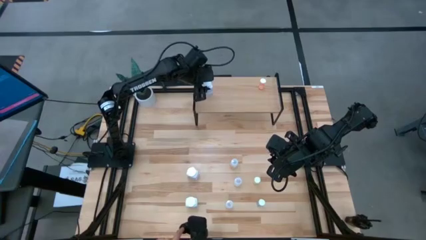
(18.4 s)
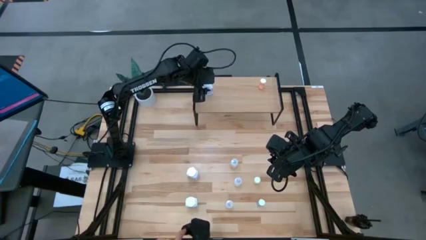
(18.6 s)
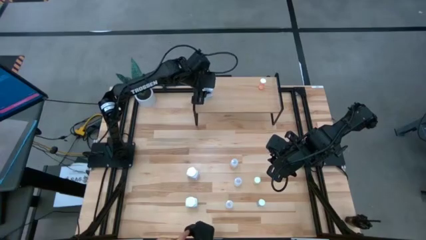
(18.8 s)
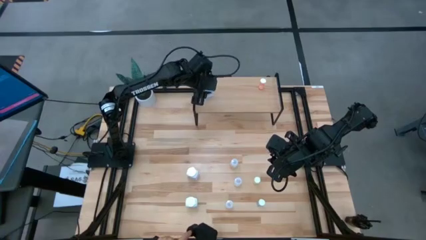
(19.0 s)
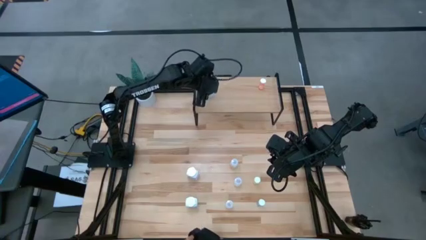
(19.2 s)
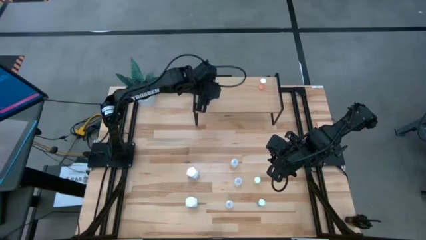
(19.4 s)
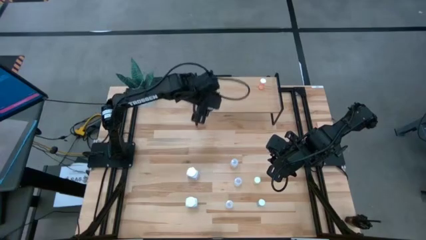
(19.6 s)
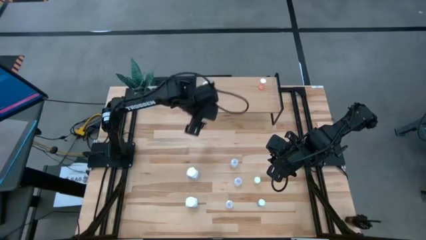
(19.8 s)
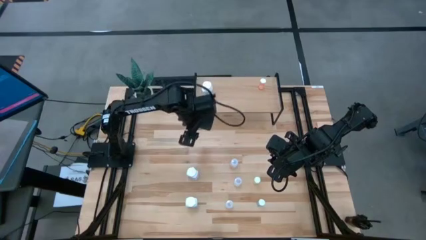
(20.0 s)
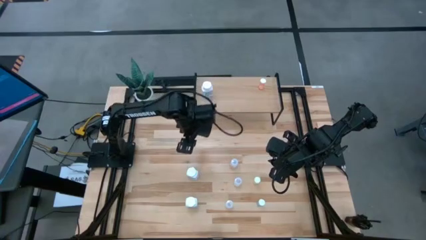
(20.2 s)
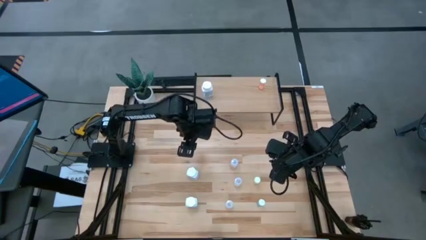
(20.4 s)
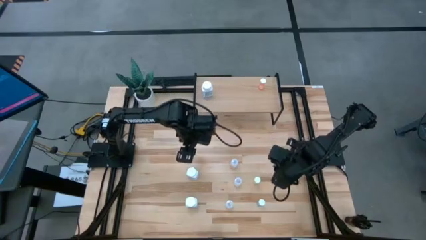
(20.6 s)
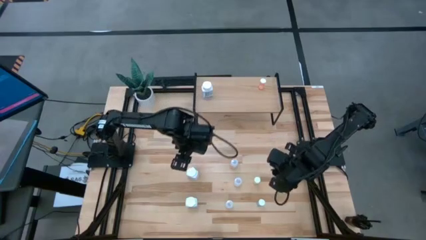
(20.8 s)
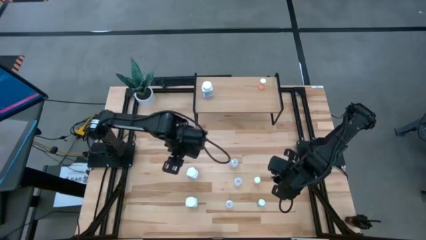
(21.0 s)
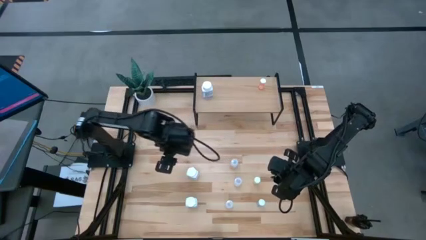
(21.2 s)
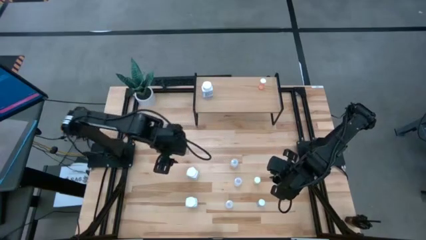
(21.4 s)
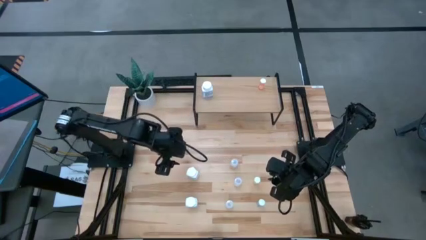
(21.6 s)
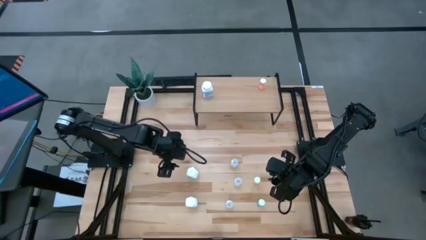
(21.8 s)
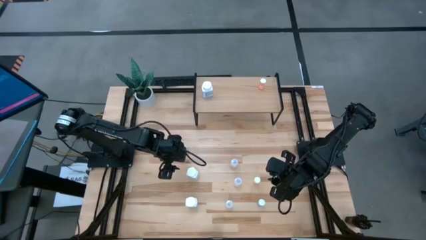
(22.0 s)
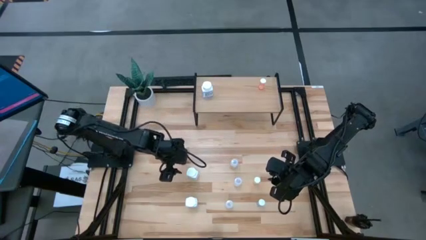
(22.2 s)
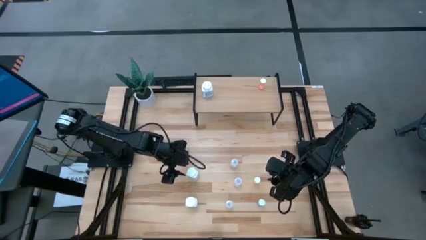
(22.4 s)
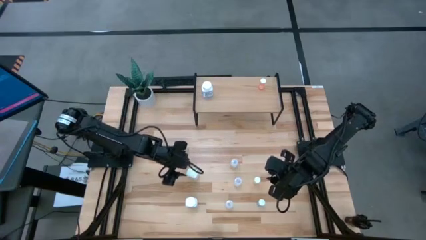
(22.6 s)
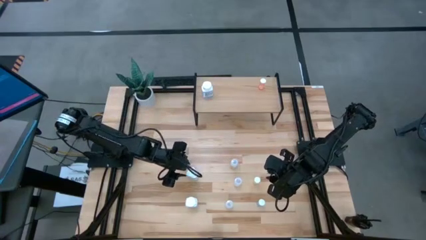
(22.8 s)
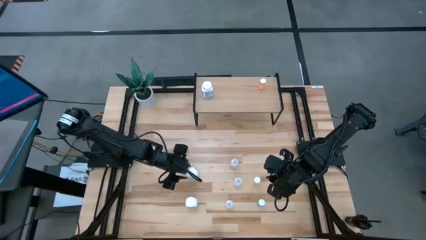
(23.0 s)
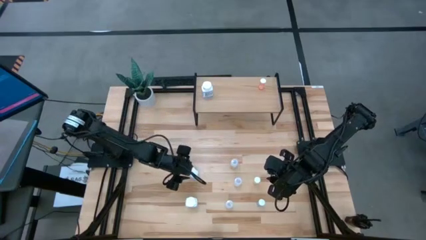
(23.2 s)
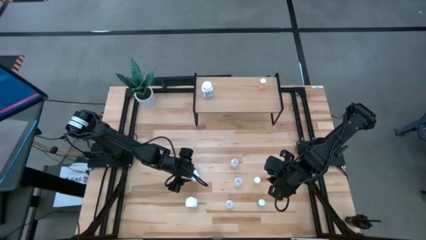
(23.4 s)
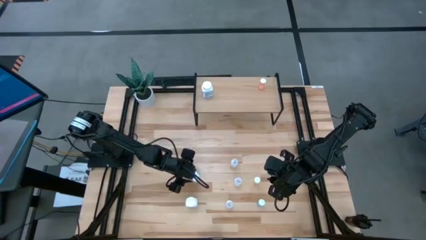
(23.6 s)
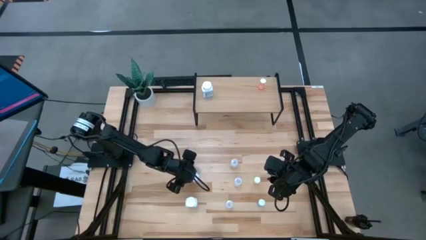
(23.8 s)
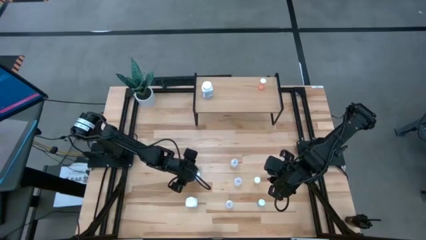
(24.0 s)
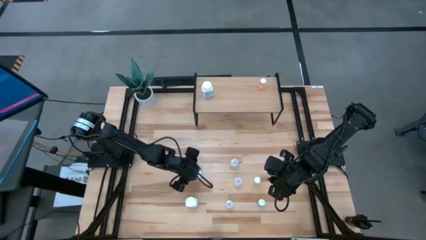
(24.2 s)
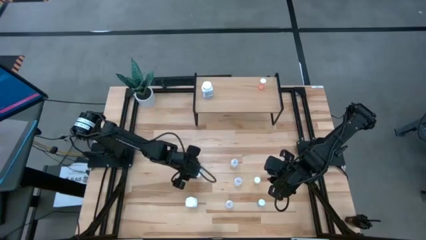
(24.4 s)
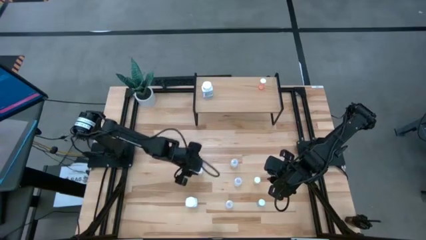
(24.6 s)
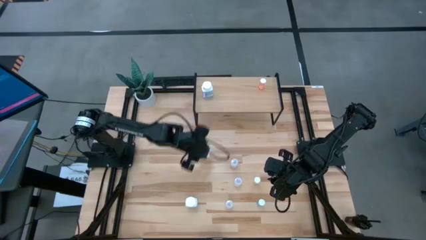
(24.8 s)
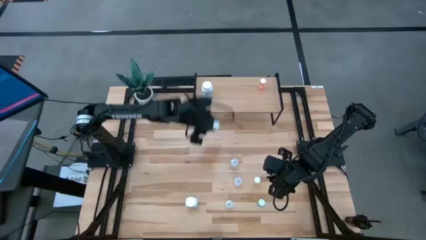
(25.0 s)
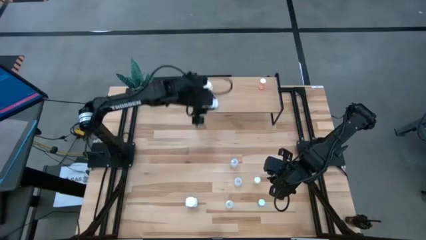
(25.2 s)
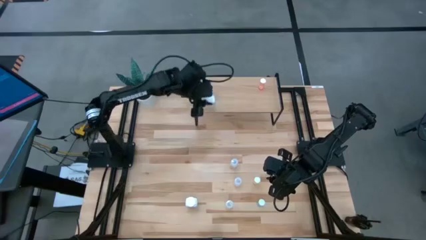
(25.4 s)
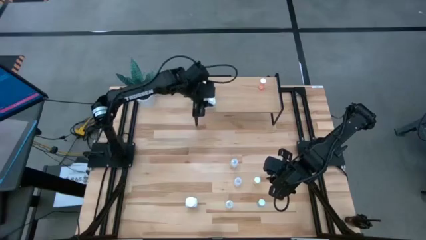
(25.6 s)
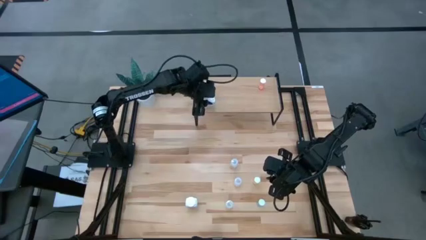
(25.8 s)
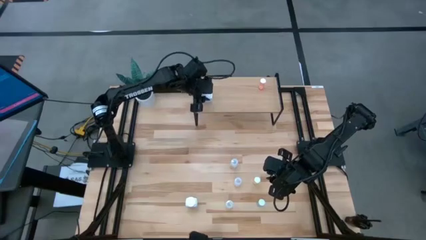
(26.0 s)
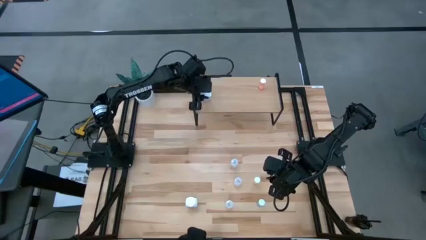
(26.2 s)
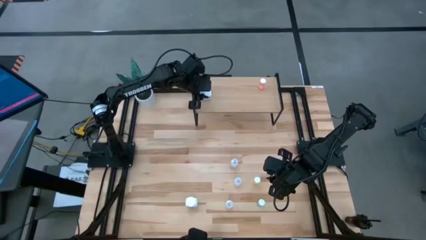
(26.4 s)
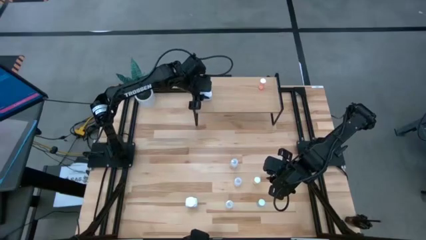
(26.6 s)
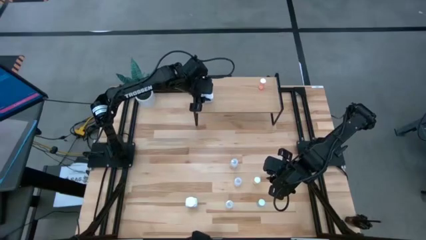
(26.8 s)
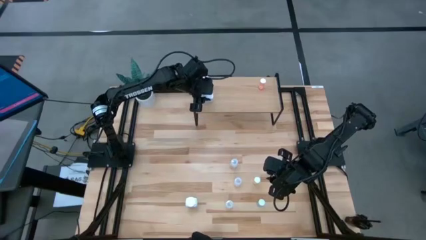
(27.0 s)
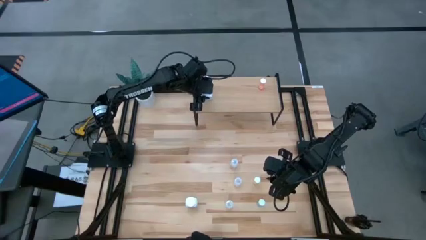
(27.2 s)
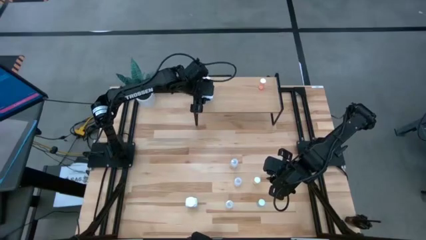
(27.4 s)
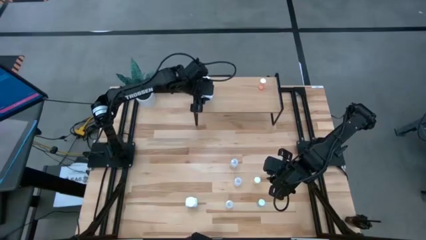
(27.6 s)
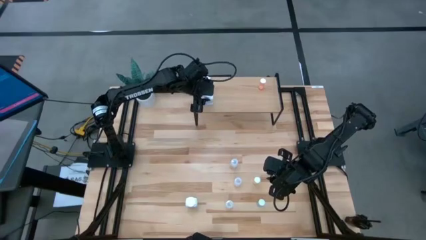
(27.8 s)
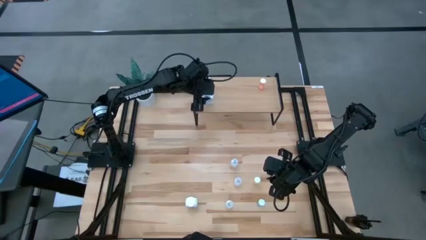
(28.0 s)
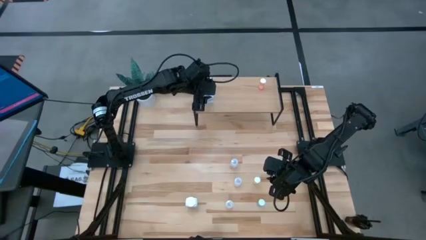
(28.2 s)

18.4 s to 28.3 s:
Task: Pick and place medicine bottles onto shelf by color
Put the middle white pill bottle aligned with the other white pill bottle on the shelf

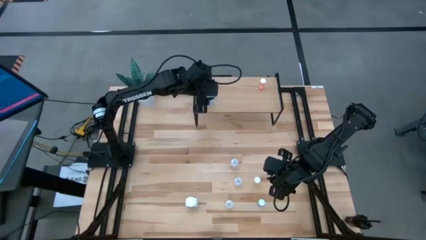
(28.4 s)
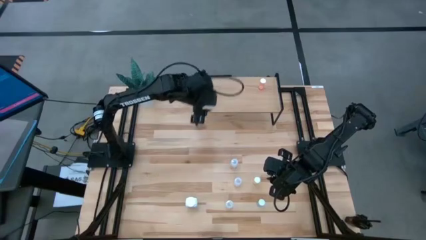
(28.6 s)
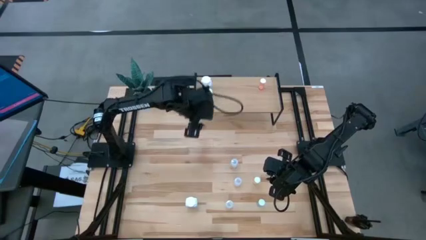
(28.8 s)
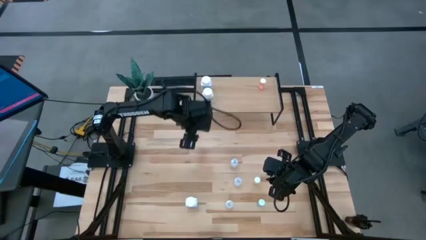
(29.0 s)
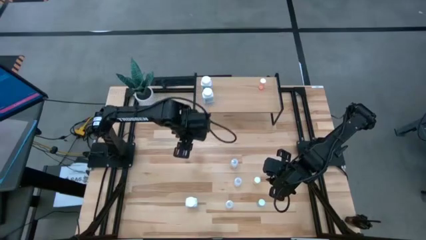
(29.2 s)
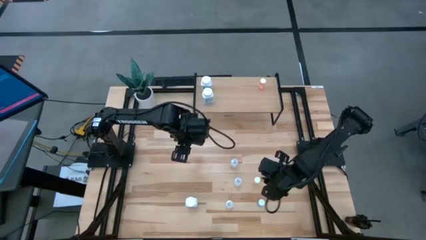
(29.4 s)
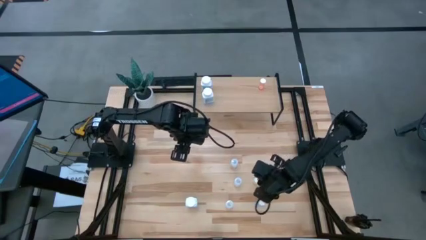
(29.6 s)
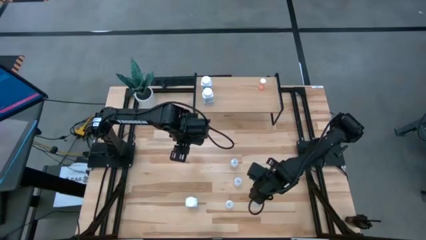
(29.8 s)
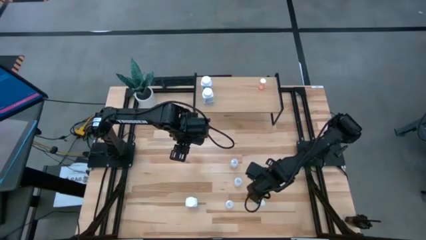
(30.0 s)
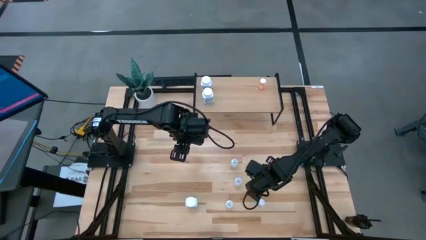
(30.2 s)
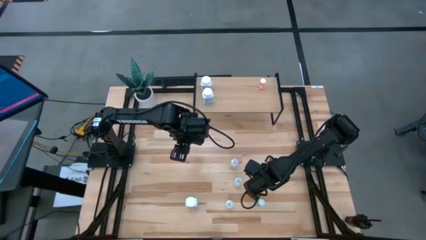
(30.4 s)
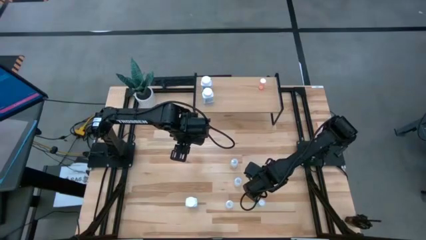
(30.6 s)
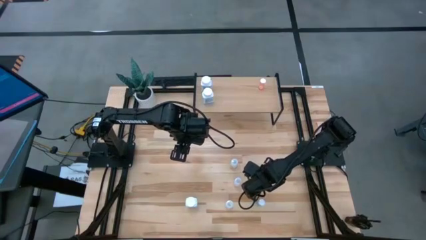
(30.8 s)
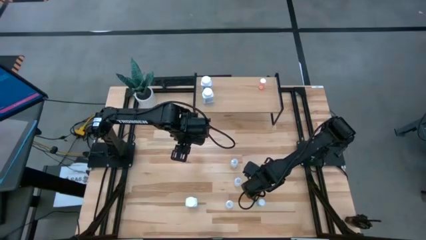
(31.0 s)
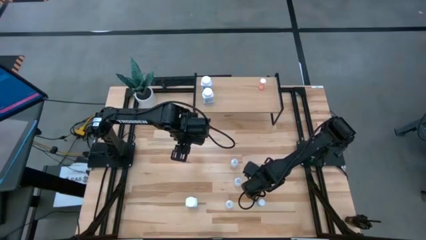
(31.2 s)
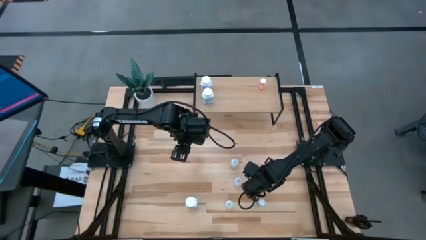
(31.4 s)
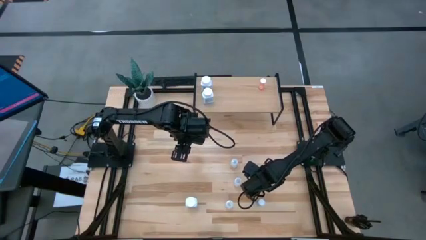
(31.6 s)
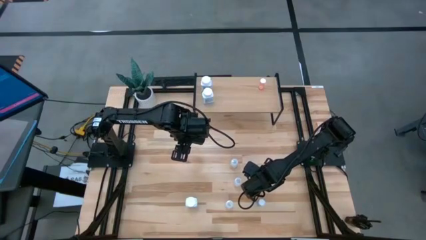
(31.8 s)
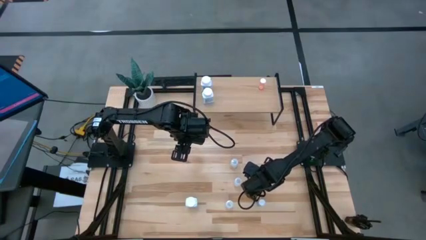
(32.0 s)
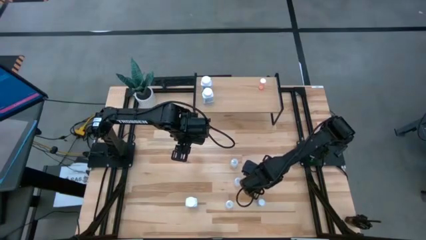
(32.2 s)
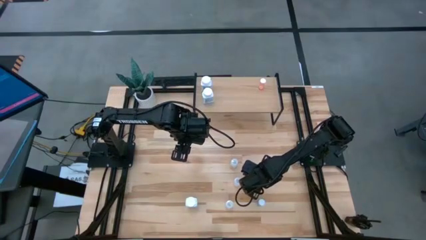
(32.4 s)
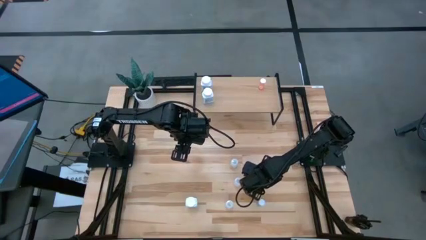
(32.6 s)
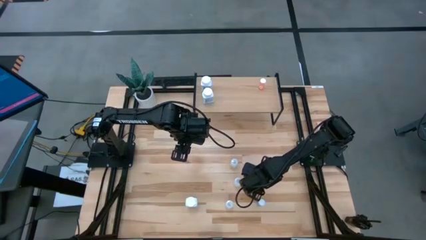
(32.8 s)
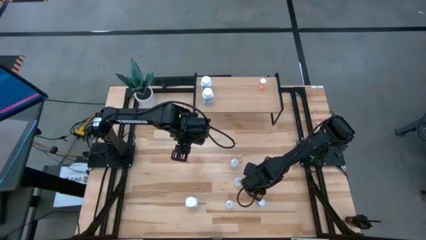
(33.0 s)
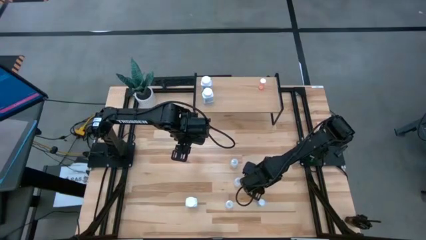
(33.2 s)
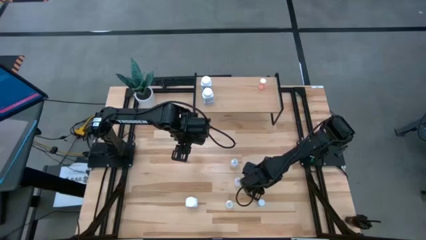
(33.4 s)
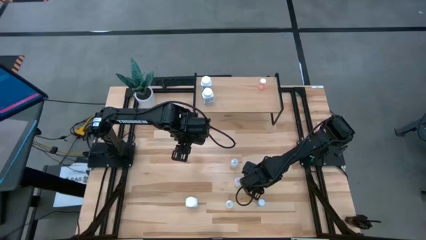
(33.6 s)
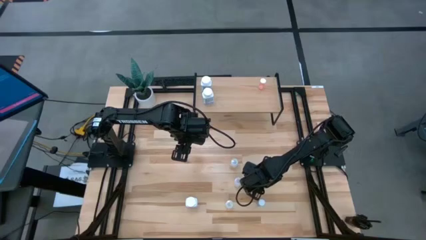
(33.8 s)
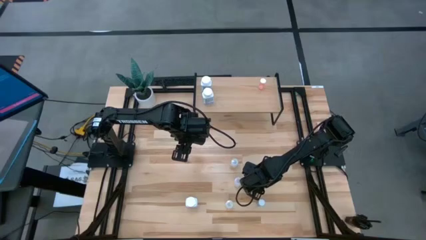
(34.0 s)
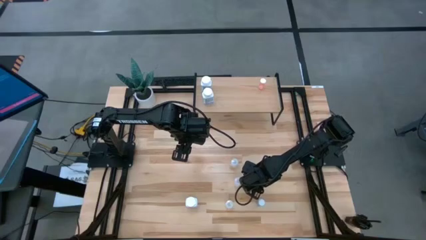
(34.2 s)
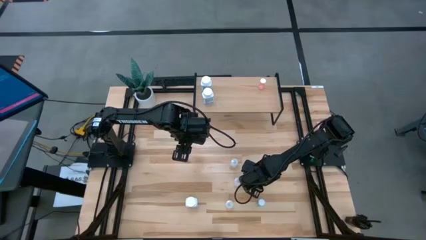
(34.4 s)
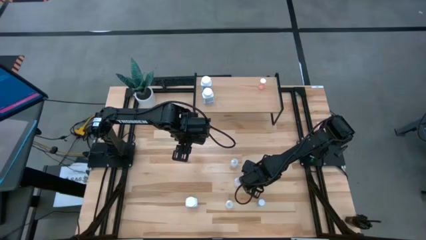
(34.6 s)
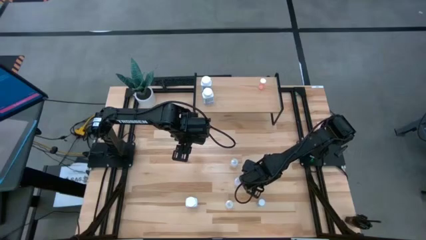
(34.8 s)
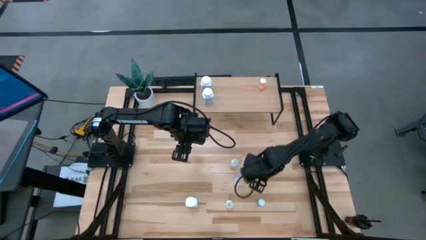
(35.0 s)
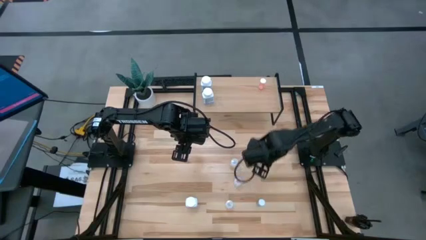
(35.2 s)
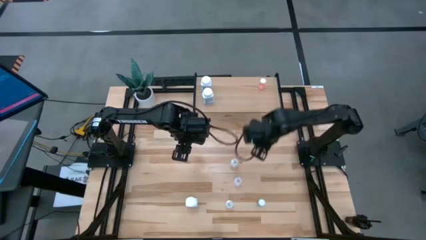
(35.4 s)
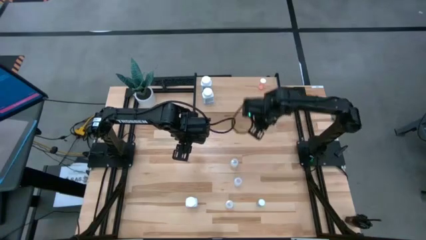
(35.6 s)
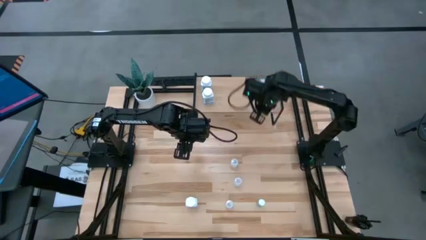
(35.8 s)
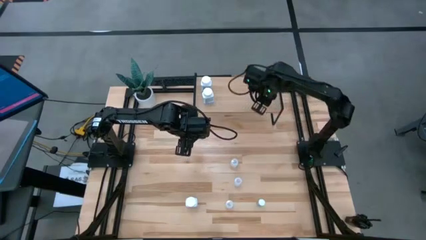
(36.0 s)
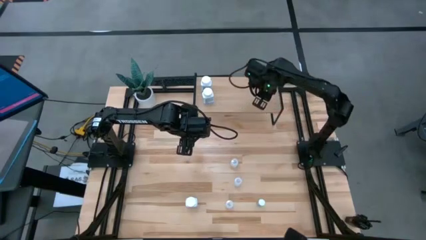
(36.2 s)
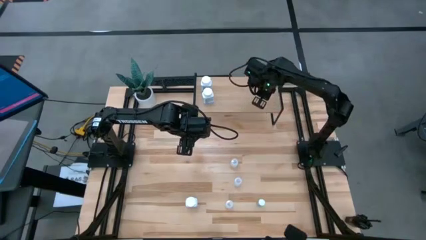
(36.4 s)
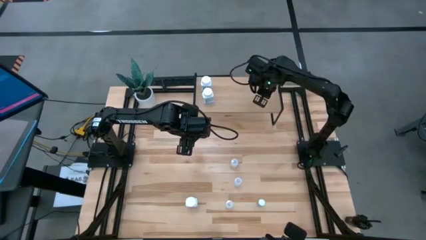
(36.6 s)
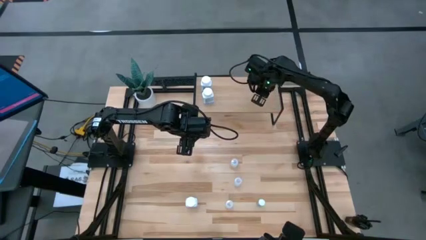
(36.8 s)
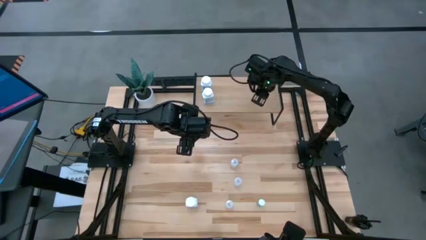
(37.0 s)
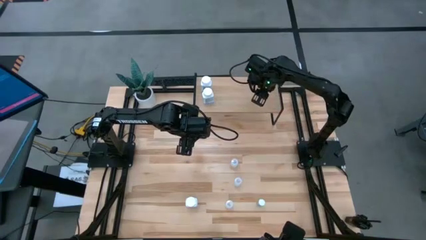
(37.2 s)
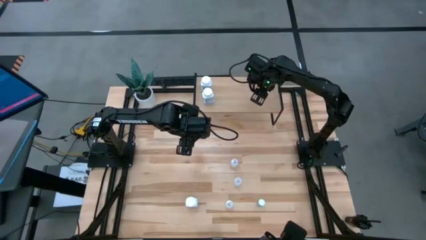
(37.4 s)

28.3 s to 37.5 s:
Put the yellow pill bottle aligned with the other yellow pill bottle on the shelf
